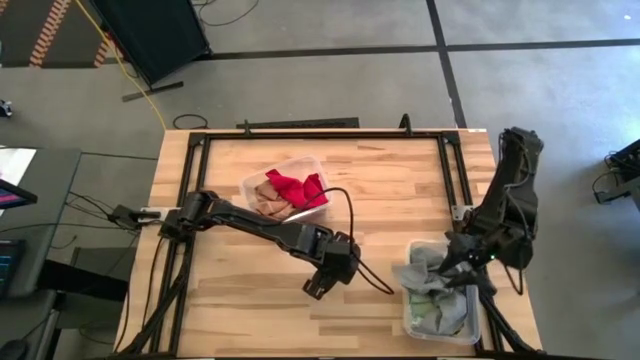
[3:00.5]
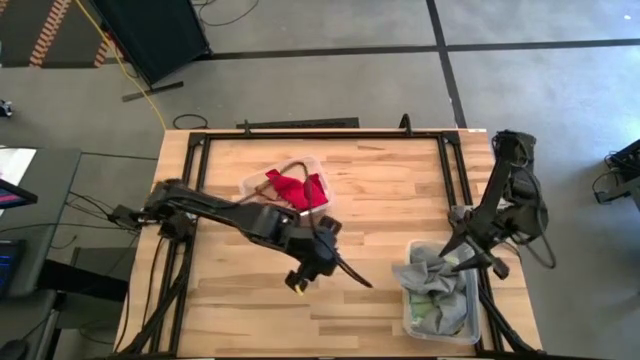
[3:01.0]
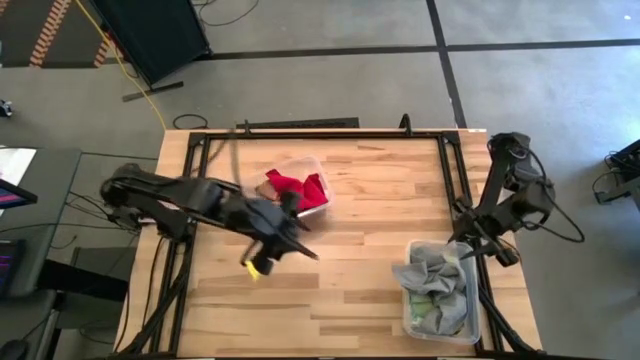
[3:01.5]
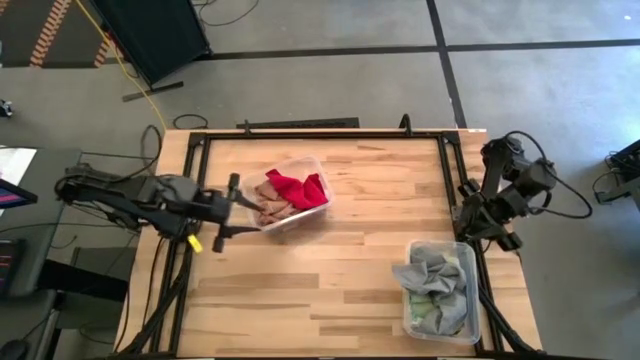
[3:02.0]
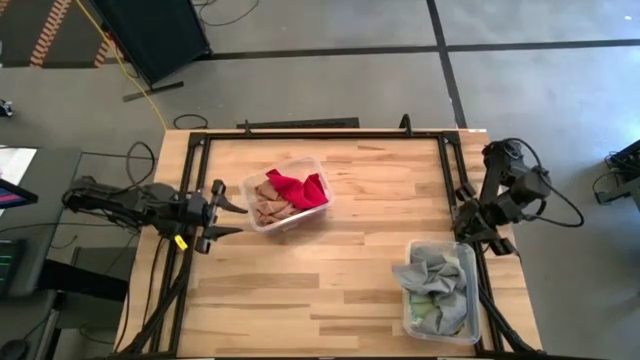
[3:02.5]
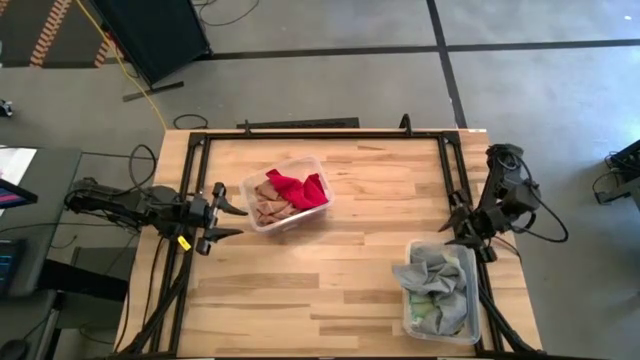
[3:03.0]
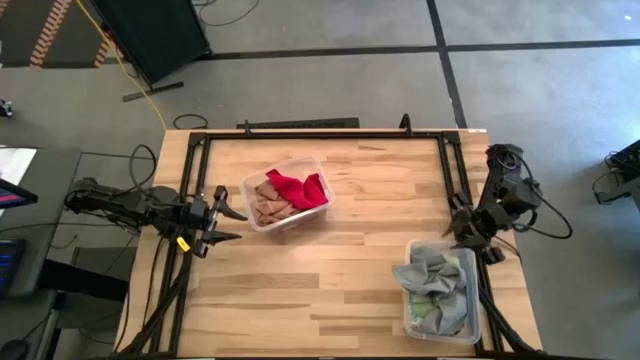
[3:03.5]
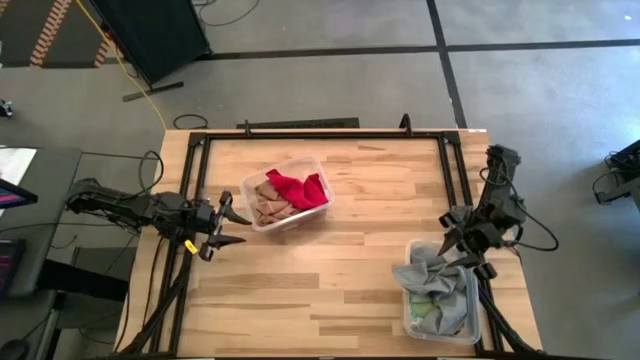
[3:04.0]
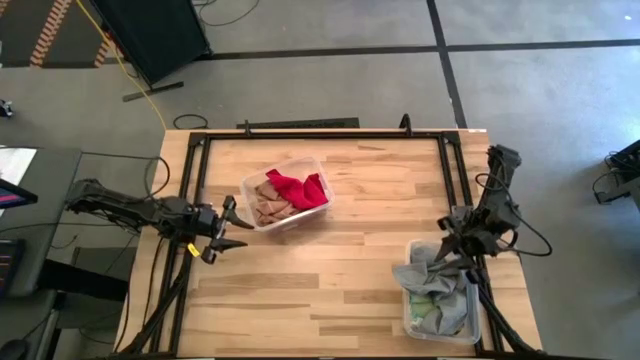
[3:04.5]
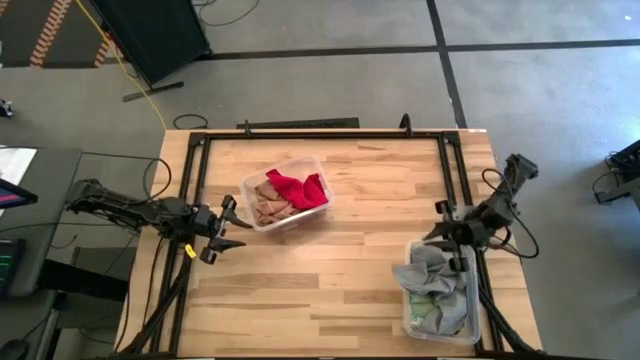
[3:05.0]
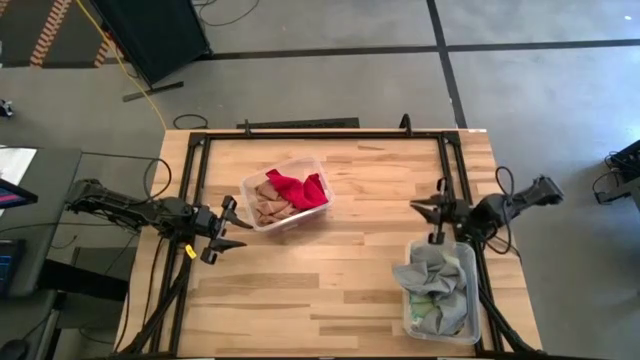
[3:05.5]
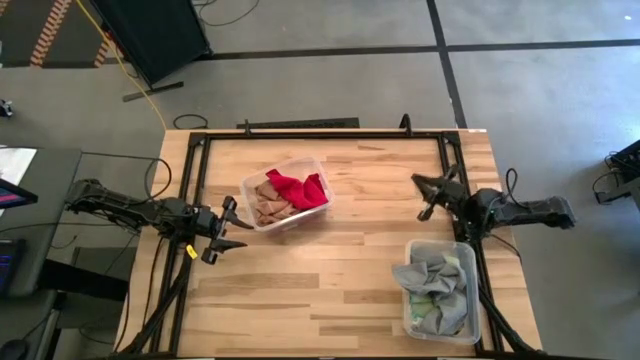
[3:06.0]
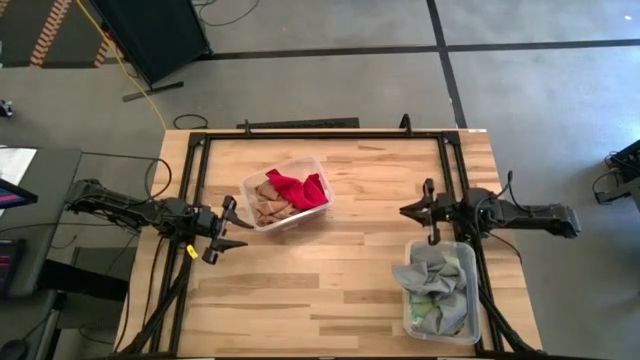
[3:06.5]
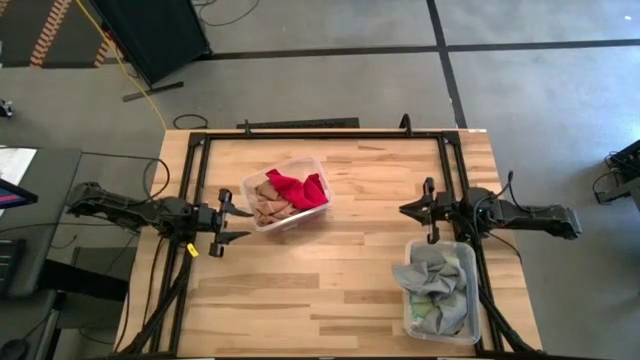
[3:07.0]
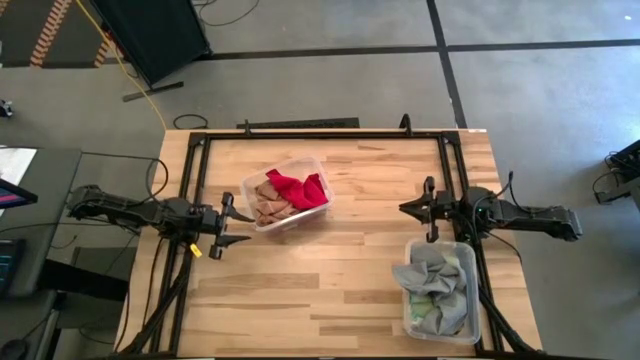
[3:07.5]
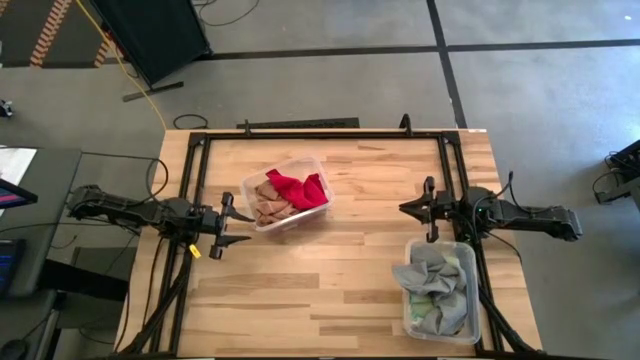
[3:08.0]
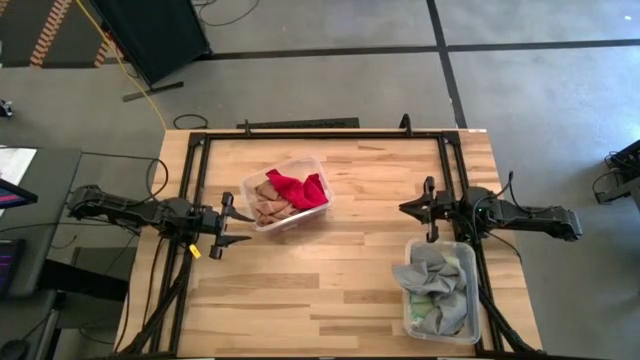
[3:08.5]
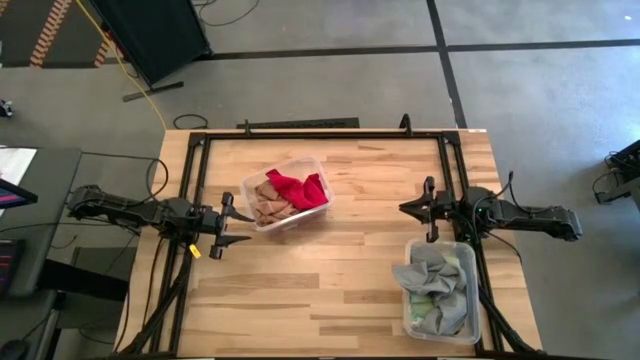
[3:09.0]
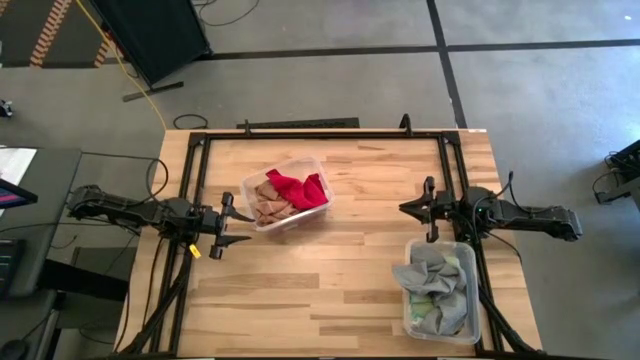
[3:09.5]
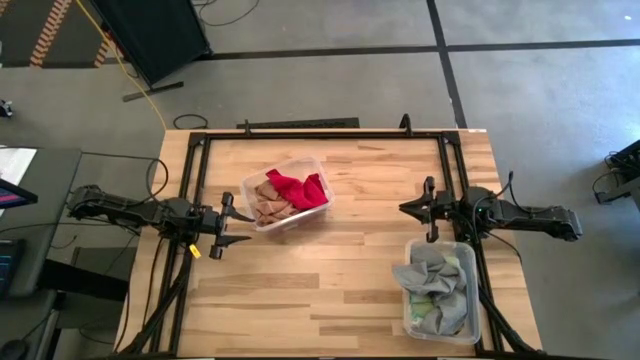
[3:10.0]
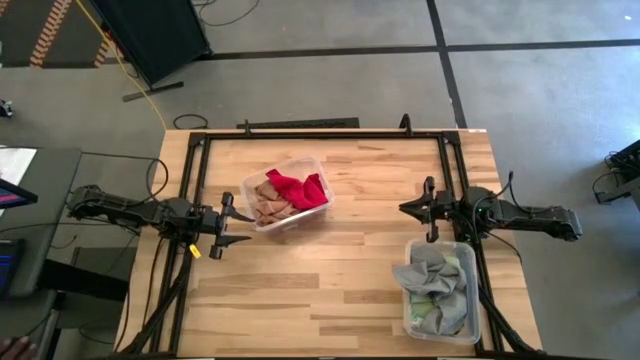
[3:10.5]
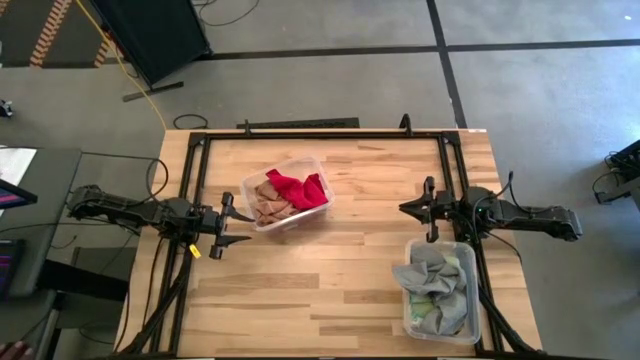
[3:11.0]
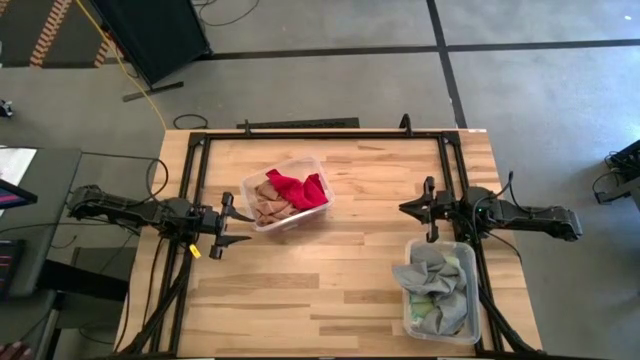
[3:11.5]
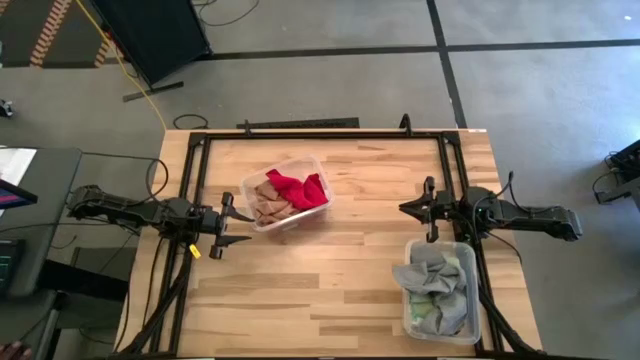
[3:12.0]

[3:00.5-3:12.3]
Task: Sort towels by color in basket
Return to Home Position

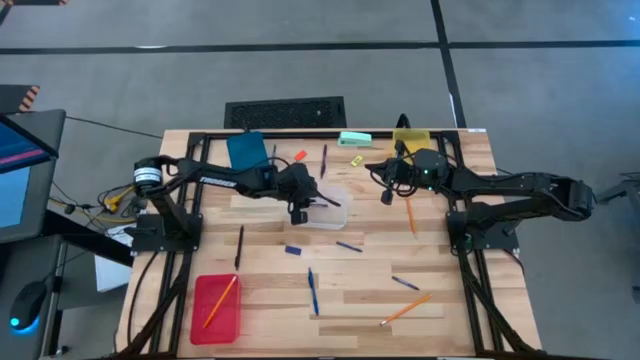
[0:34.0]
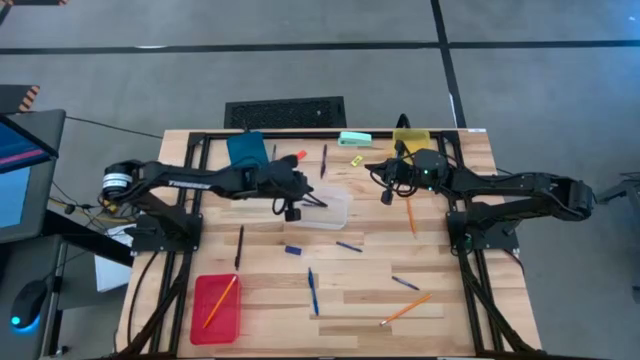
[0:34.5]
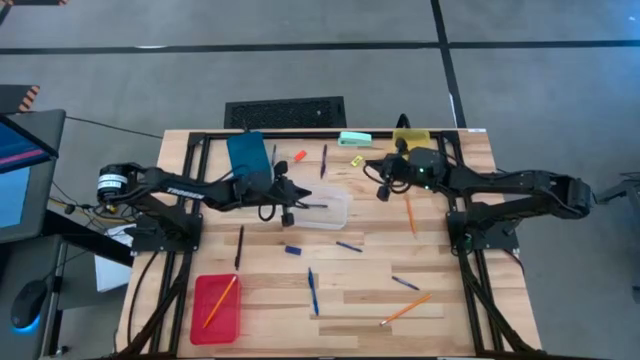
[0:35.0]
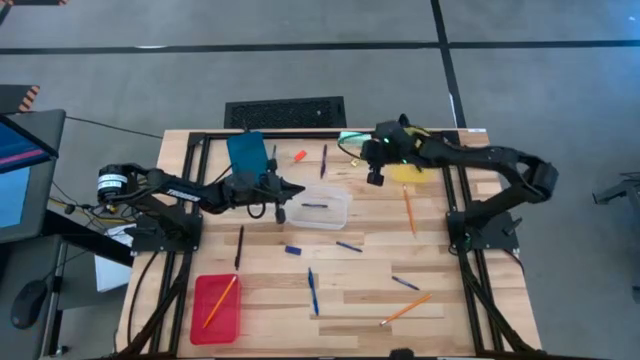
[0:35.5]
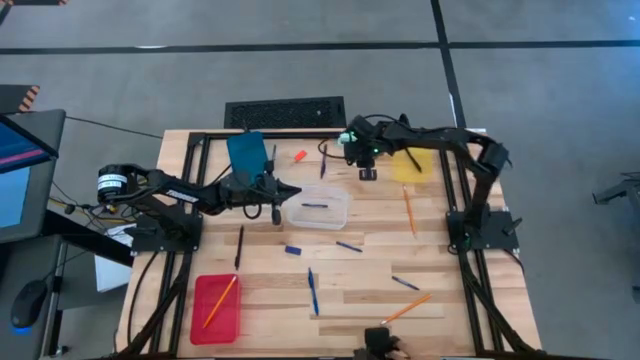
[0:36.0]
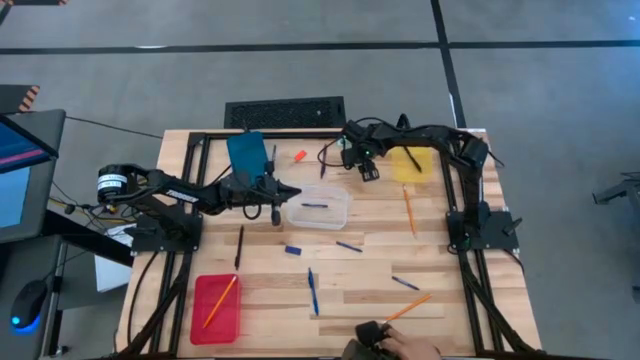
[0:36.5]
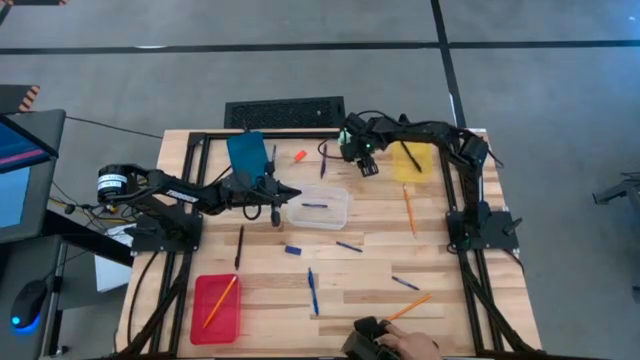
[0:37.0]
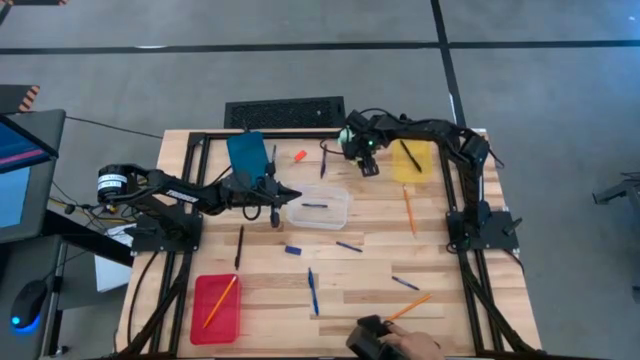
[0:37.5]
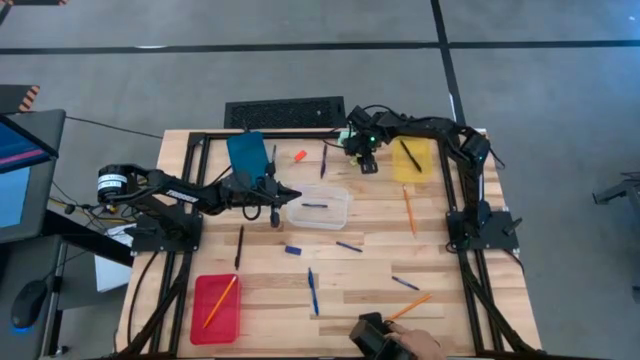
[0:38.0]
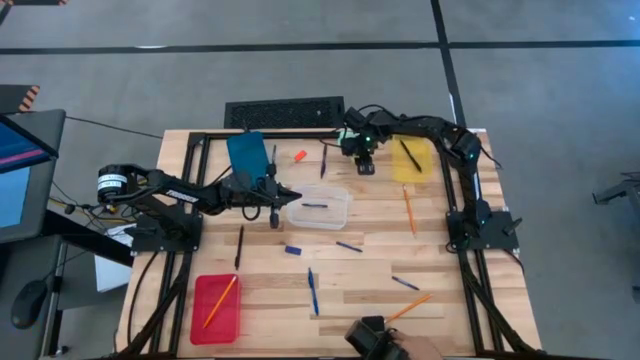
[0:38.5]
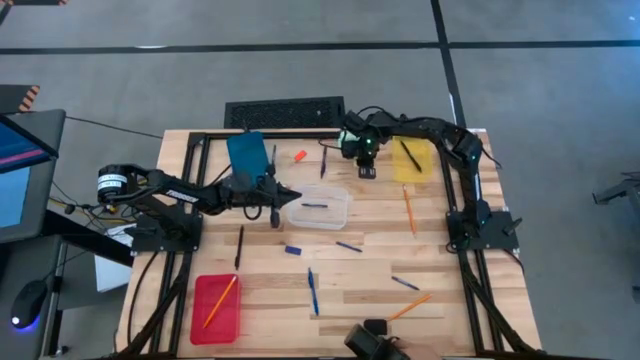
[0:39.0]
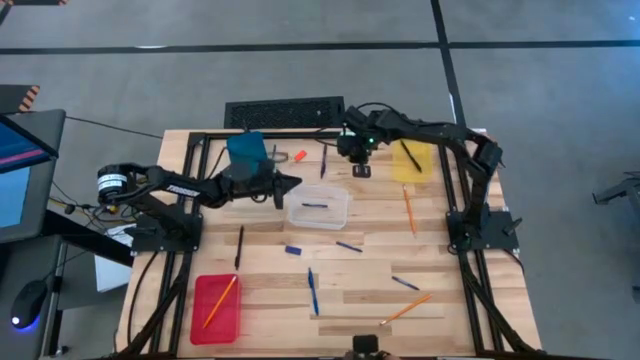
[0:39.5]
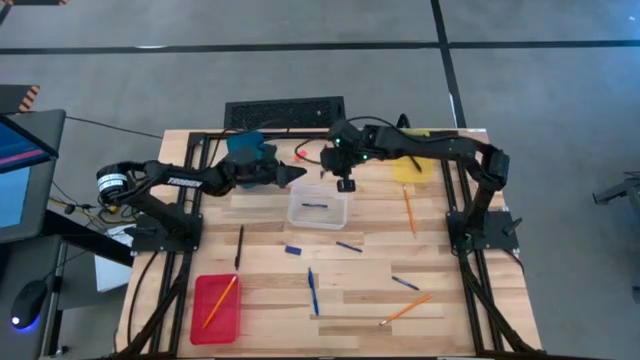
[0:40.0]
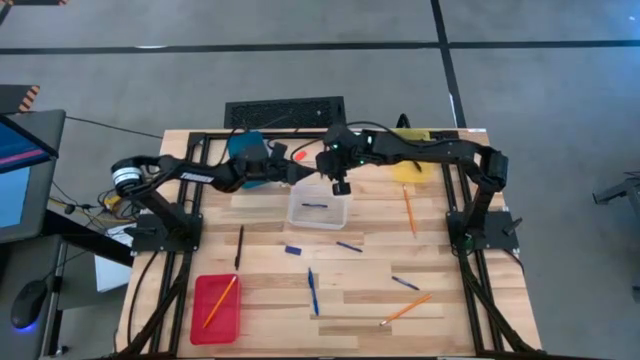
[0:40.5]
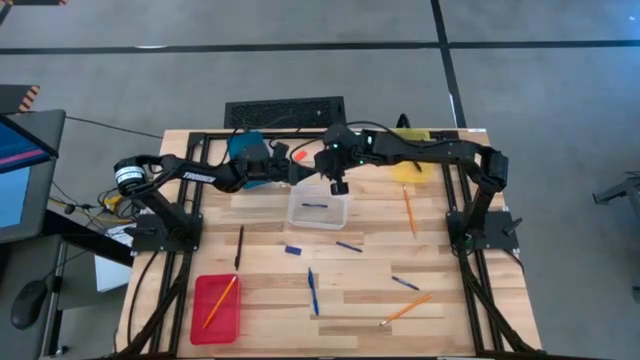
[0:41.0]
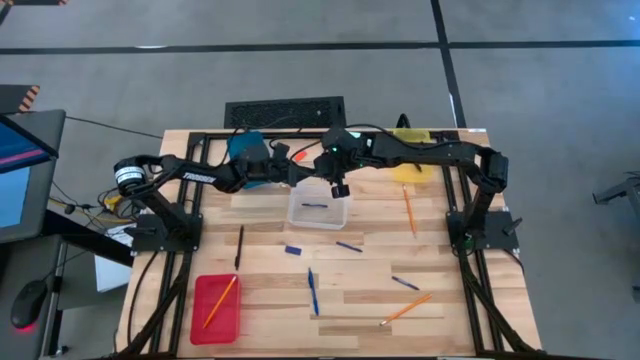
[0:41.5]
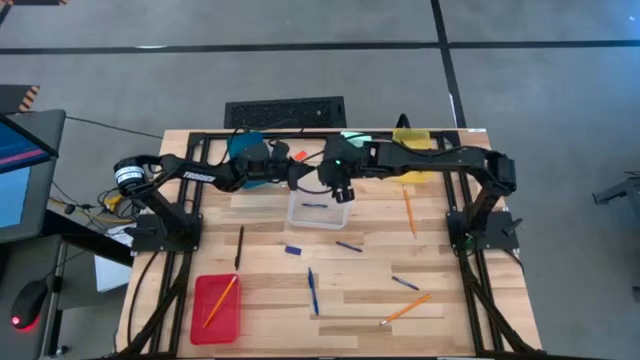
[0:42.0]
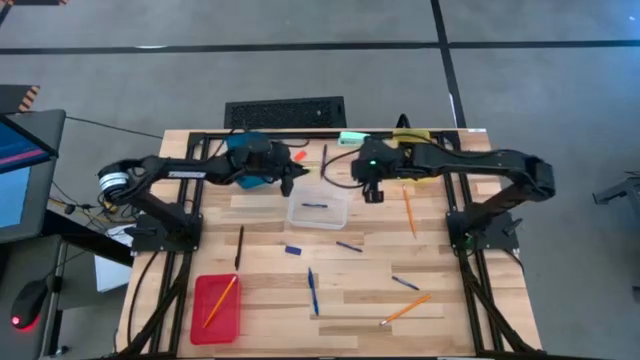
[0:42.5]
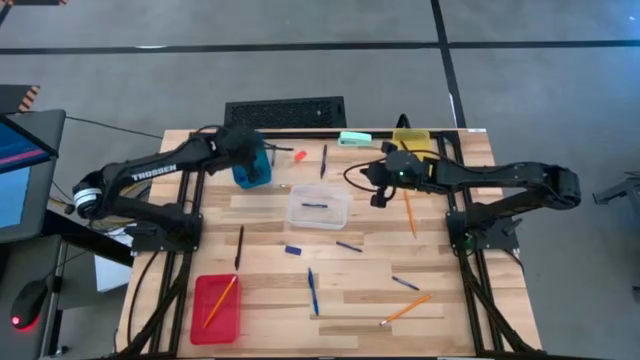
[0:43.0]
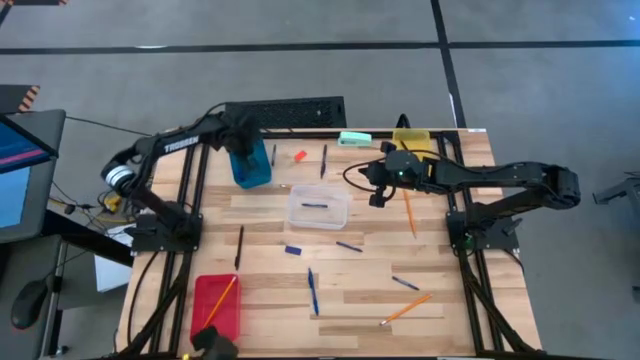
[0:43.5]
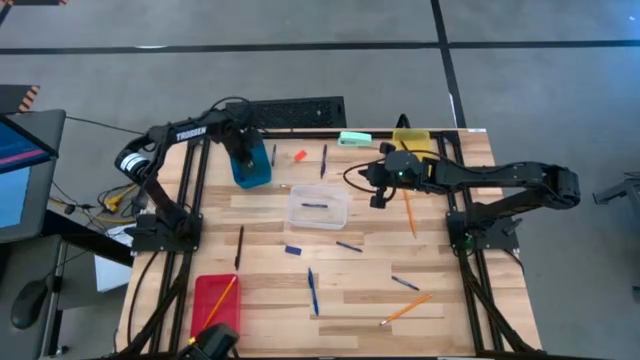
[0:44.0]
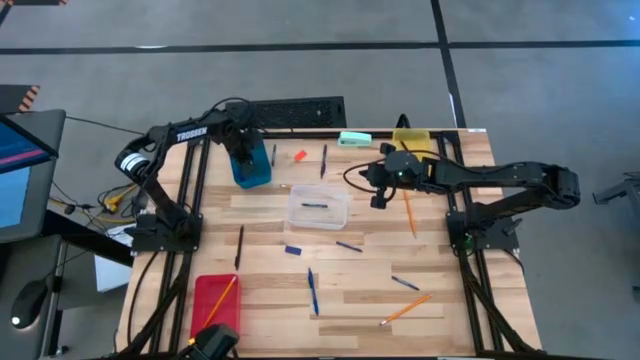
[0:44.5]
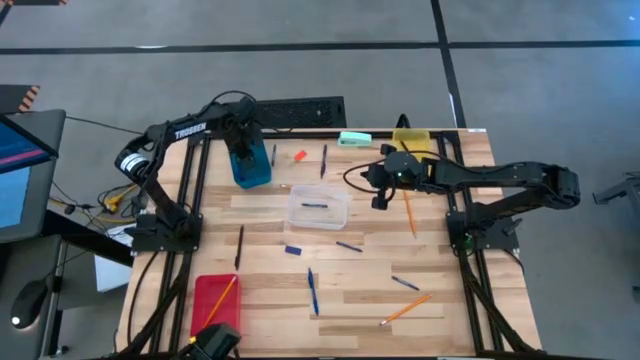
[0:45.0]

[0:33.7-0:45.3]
Task: Sort crayons/erasers/pens/pencils in bins
Put the yellow eraser into the blue bin
